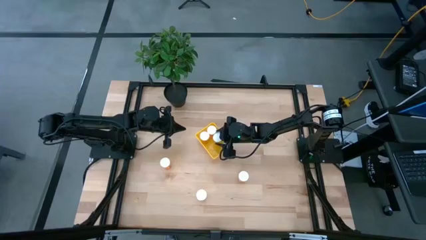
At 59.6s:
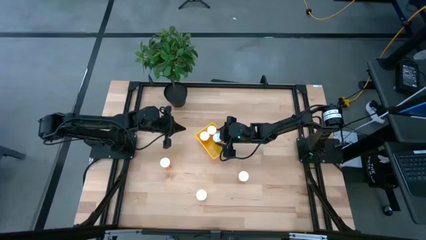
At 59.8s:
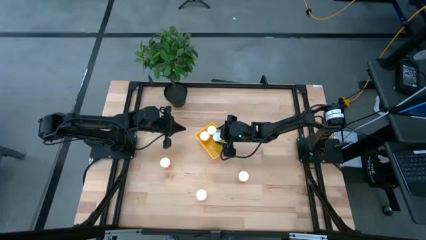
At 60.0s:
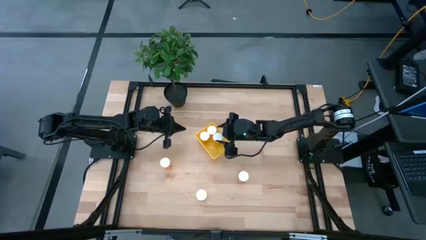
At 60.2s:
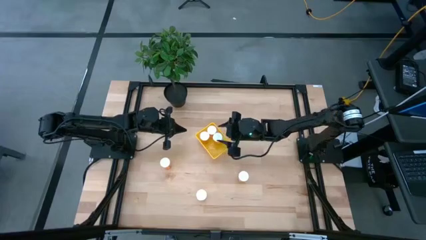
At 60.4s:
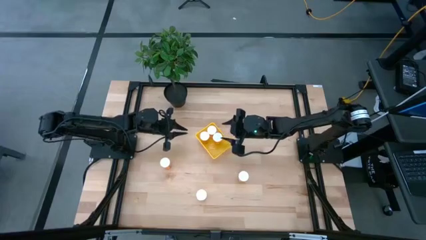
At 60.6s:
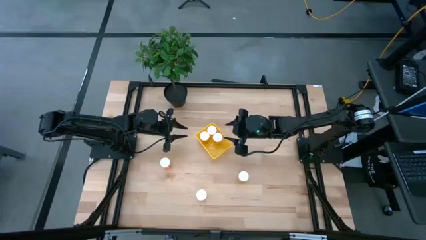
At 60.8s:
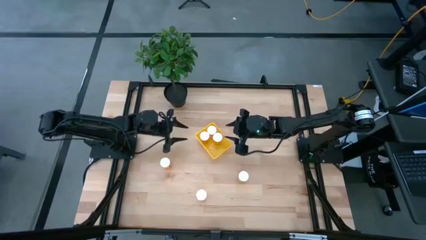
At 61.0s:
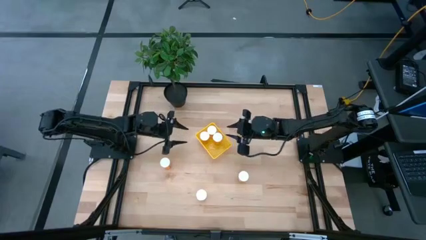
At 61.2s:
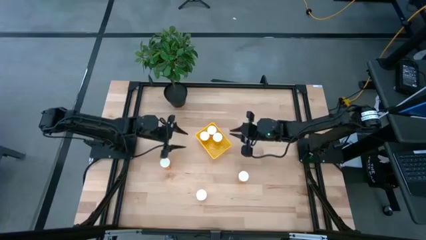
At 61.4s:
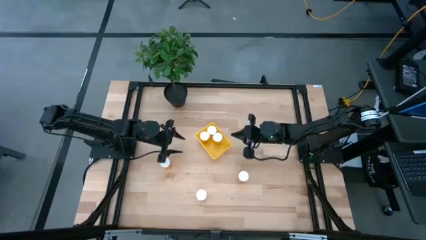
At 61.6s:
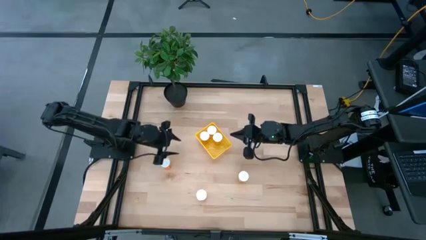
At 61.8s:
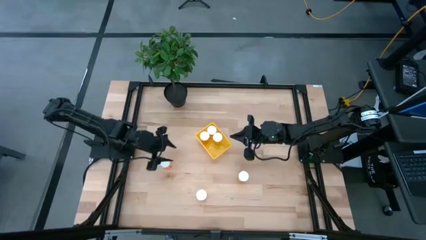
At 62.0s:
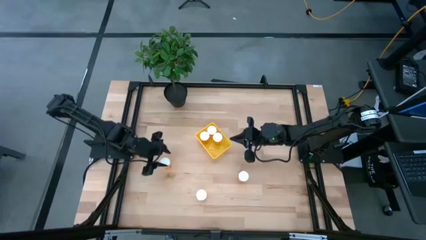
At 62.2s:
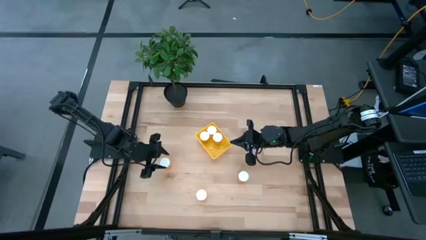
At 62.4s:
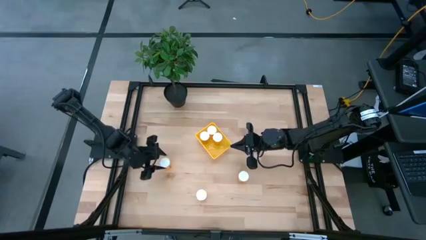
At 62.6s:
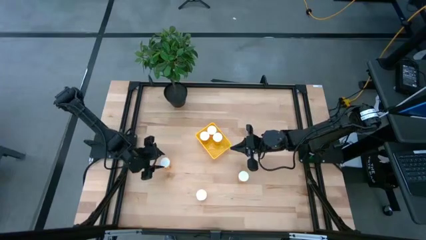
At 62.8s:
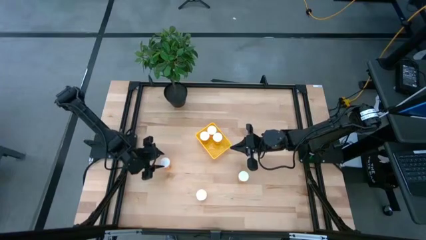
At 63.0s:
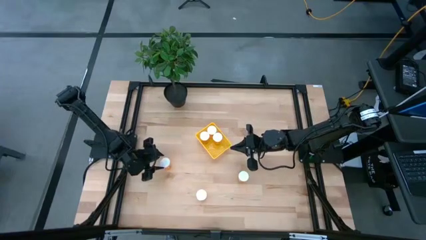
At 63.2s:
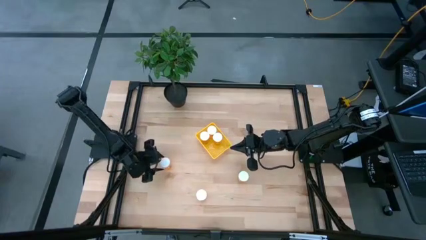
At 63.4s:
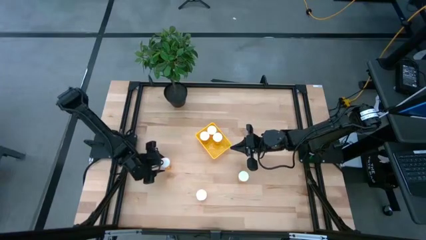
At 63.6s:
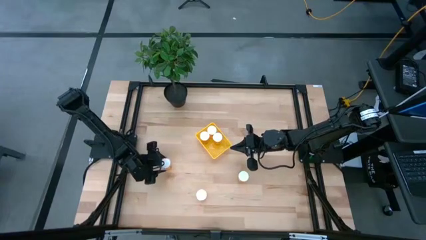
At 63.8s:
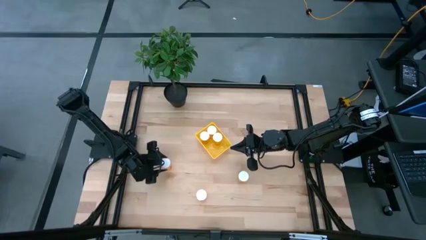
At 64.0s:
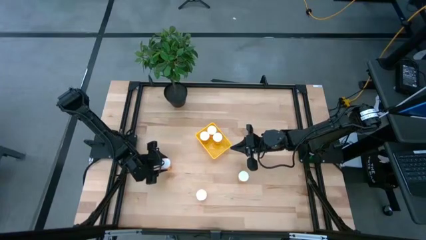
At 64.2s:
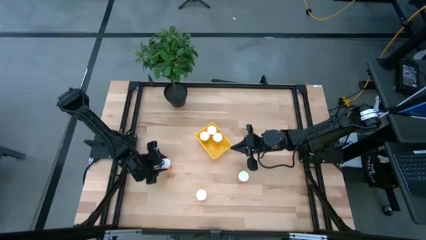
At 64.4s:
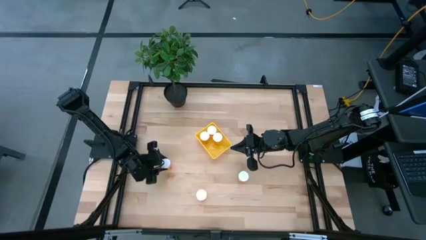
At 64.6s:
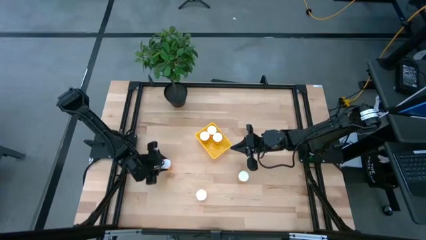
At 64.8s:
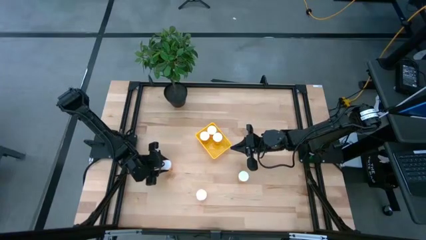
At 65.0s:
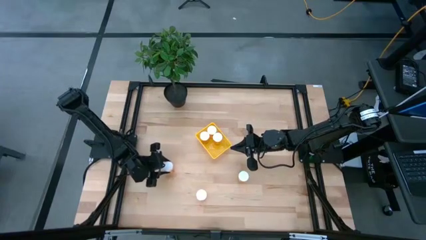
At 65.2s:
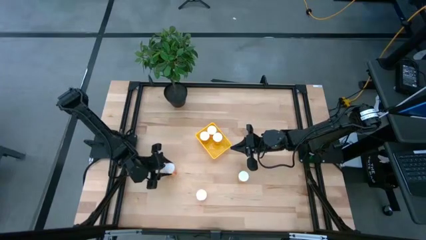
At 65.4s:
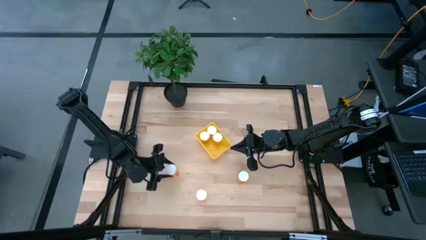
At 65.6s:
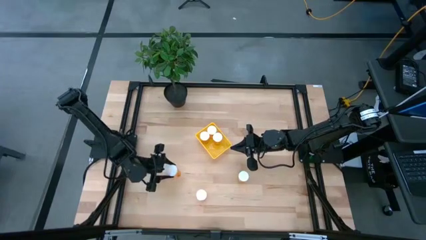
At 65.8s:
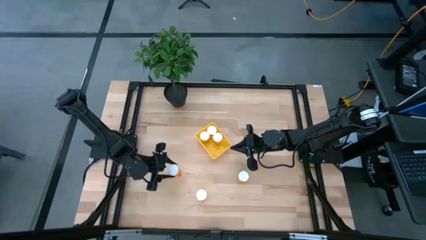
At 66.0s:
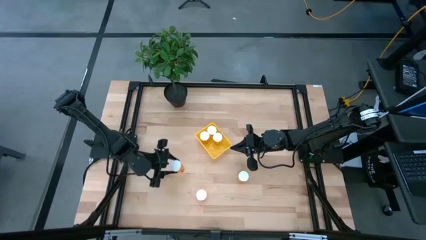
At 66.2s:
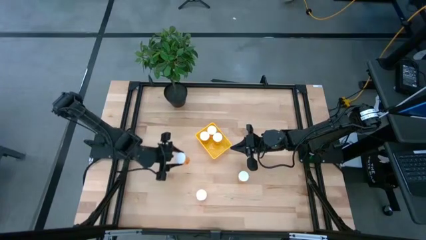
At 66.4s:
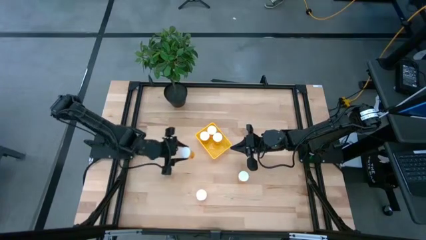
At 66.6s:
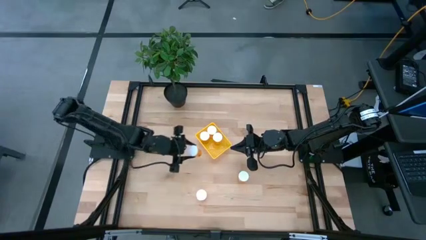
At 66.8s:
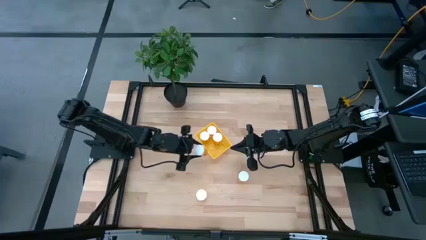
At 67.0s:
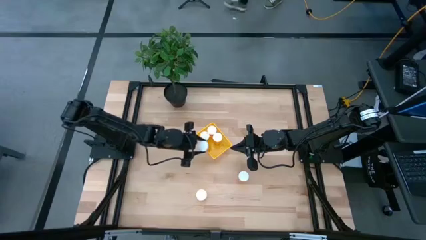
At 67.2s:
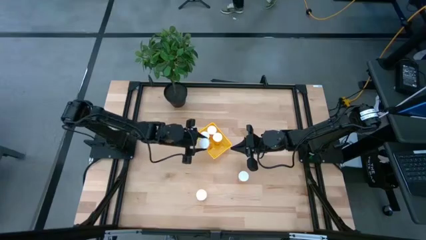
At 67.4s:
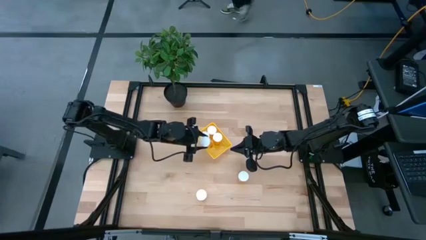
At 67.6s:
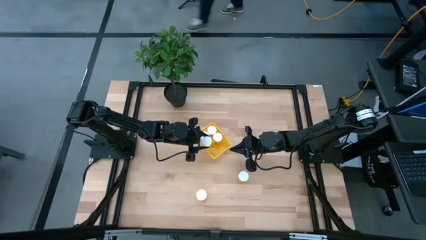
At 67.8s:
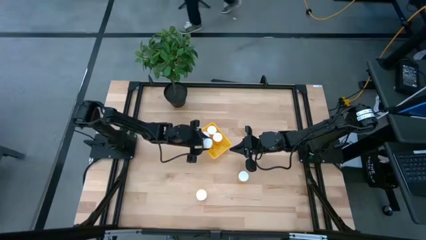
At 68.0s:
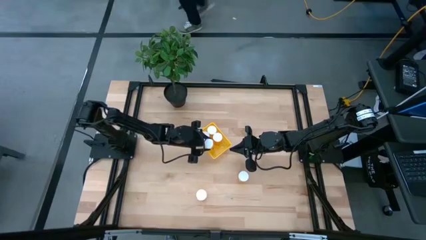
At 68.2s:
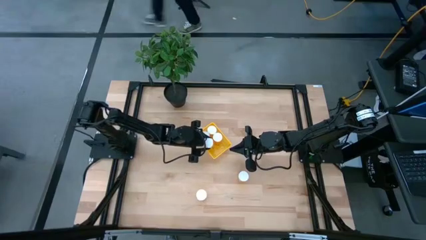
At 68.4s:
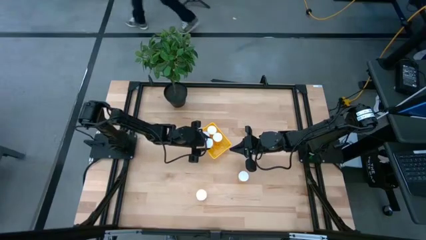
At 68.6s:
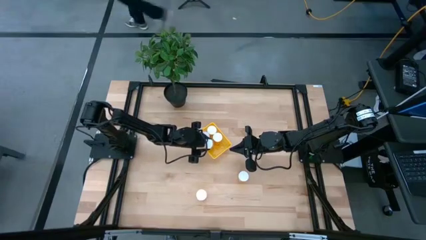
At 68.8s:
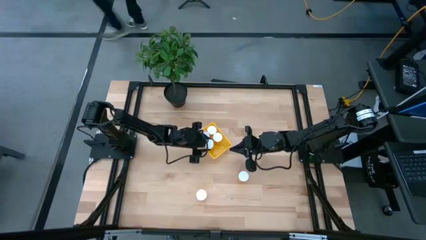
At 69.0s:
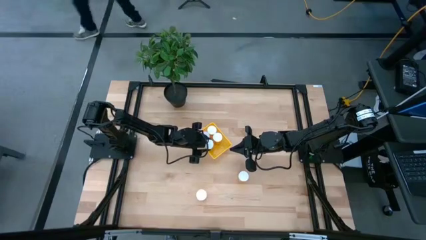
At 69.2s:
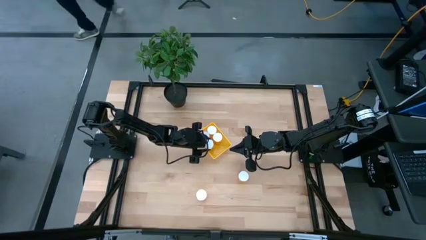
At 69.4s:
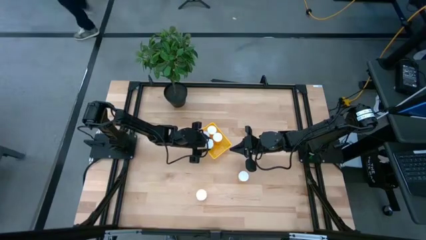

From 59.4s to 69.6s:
Task: Pick and place pill bottles into a basket
Put the top left pill bottle into the bin

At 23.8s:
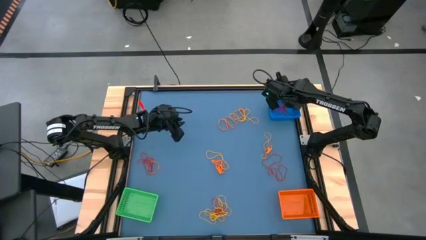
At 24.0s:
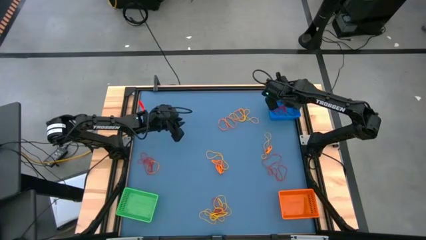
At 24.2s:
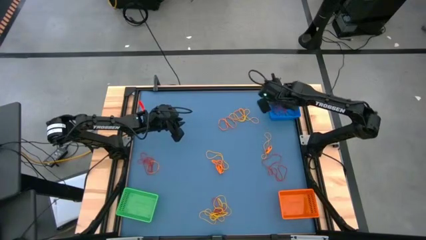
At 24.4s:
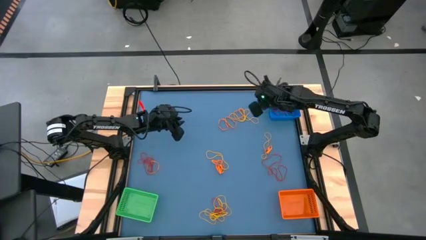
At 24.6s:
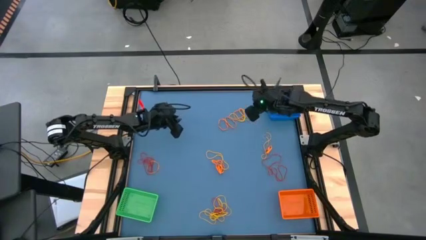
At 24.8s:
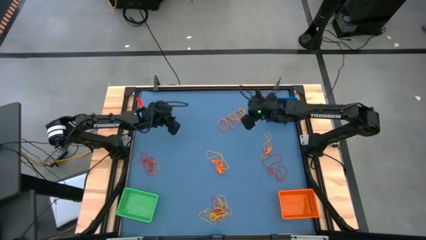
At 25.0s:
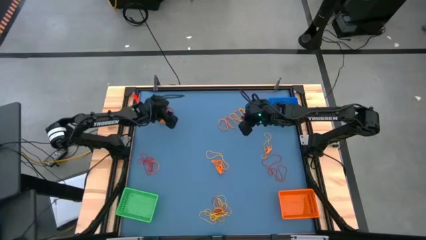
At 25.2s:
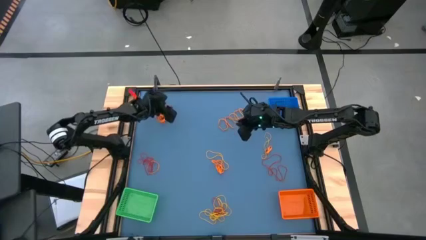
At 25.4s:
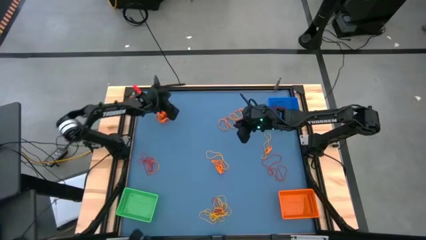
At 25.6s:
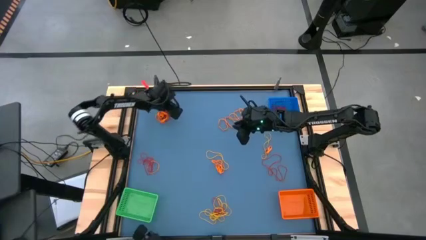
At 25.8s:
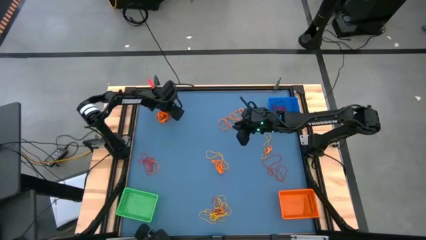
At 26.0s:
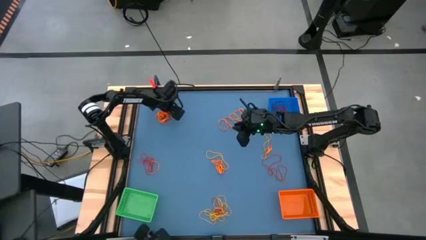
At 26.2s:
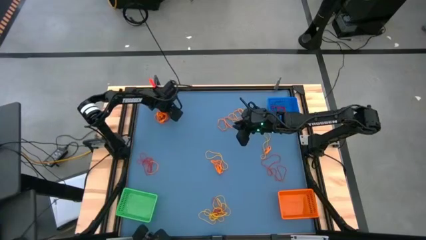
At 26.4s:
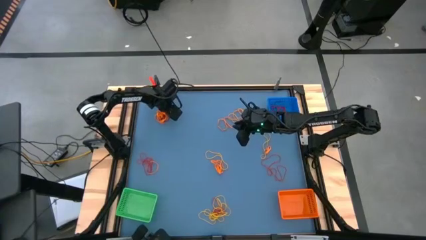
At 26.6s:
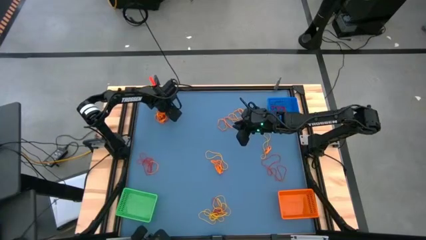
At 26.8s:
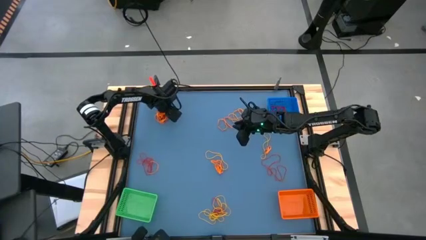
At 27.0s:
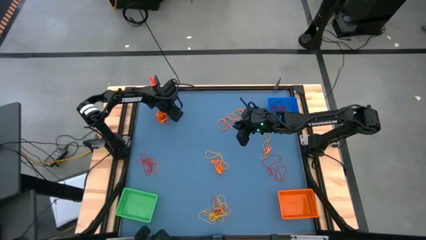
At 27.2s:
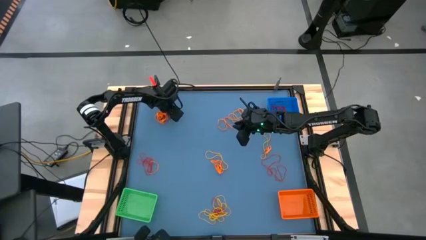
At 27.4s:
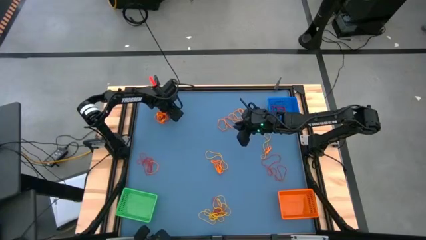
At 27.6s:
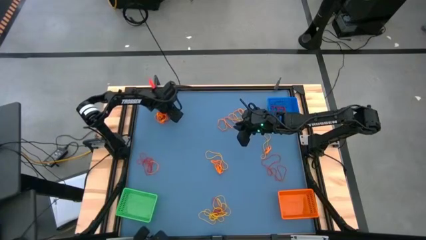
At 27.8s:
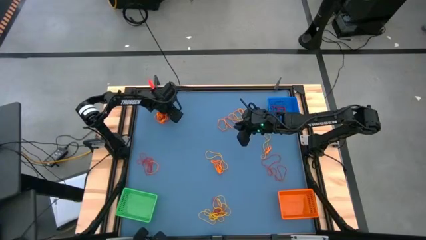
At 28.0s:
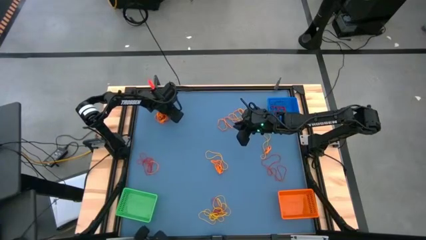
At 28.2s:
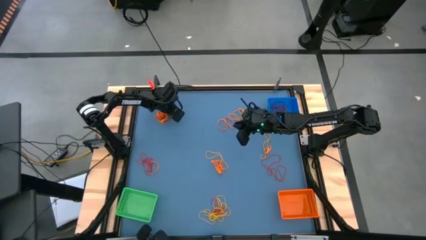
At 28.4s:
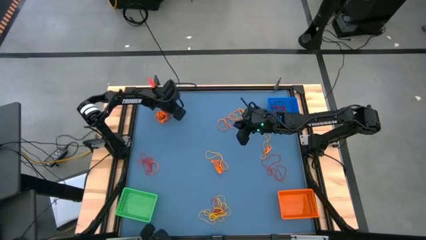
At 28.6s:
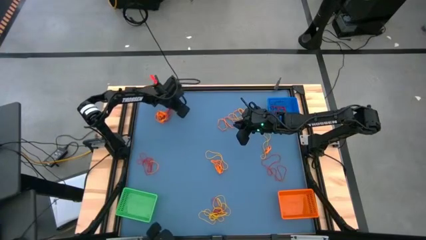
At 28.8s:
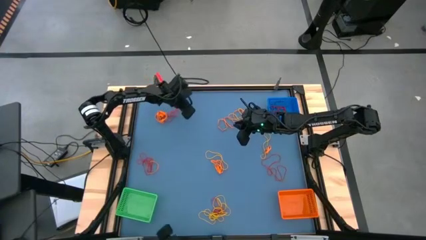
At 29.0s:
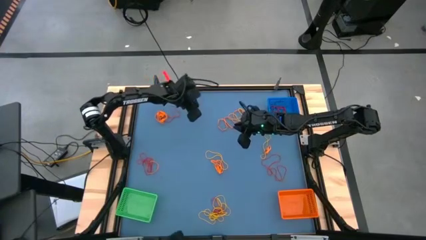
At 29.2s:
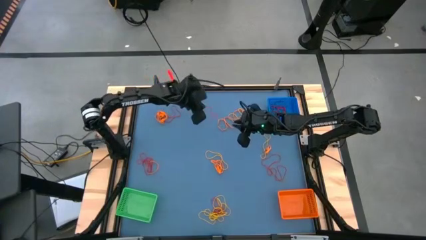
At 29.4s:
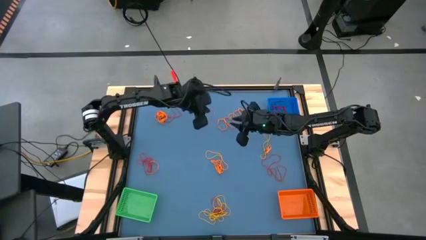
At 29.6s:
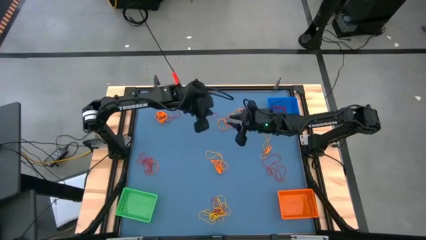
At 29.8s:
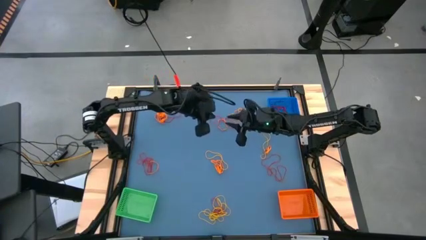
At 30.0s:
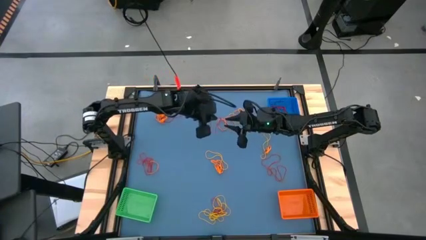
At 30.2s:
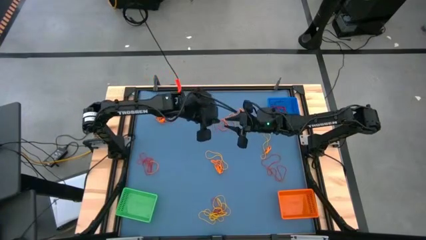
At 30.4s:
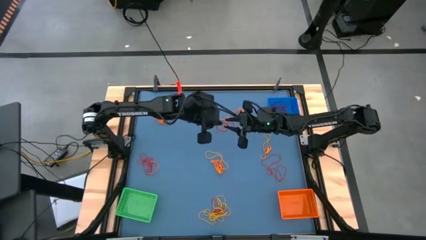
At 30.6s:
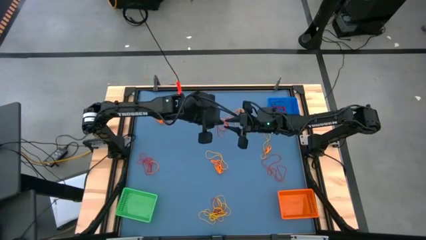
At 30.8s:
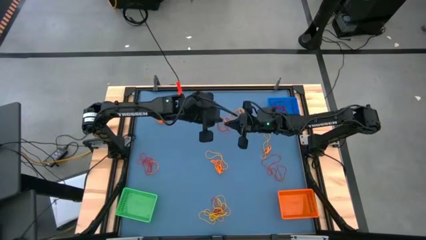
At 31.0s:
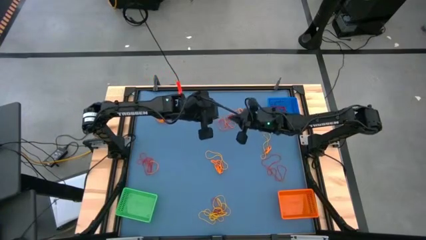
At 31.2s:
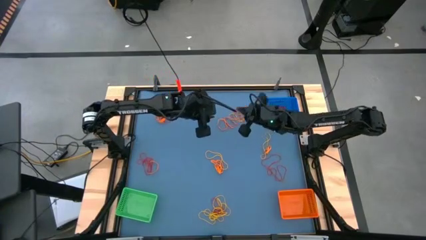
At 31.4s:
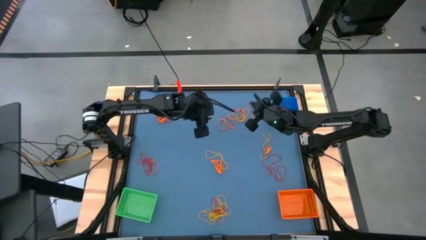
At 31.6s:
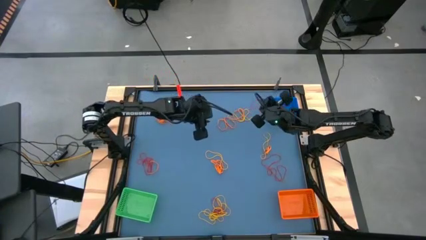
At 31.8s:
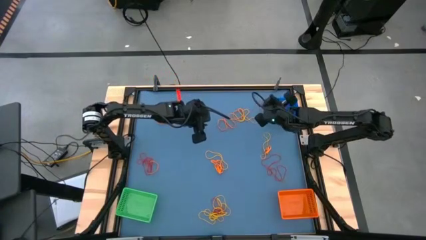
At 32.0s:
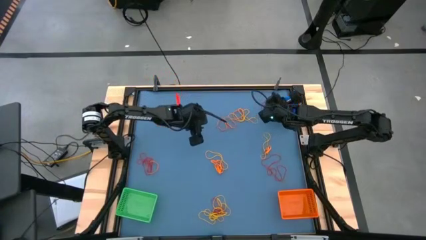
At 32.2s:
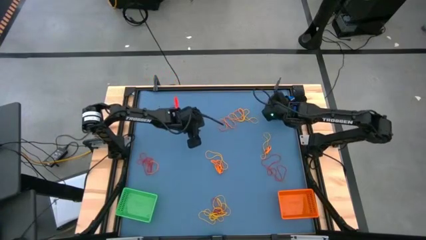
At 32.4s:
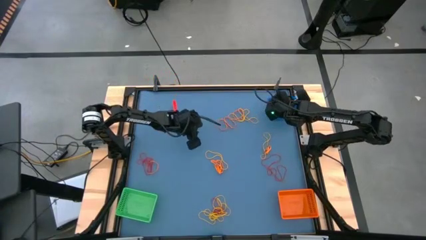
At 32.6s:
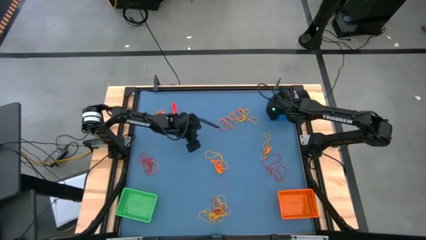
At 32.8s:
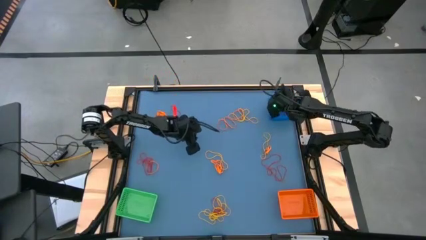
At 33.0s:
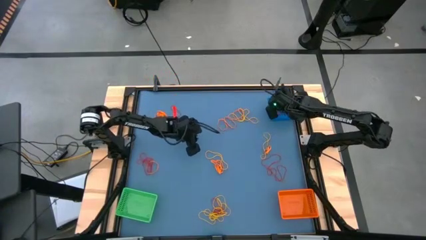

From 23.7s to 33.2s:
Task: Sort rubber bands into baskets
Put the red rubber band into the blue bin
